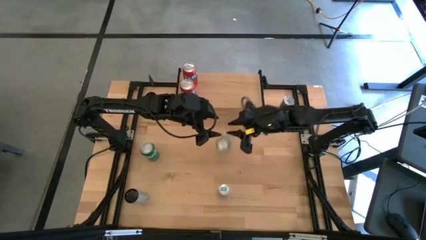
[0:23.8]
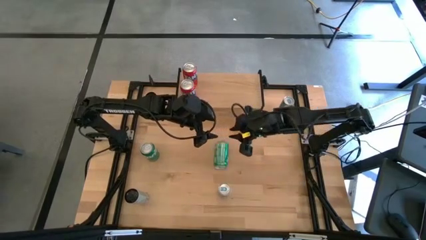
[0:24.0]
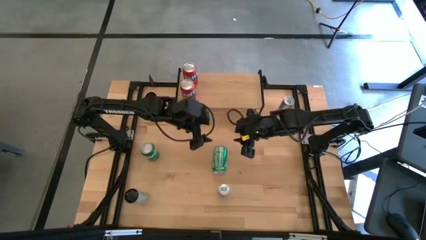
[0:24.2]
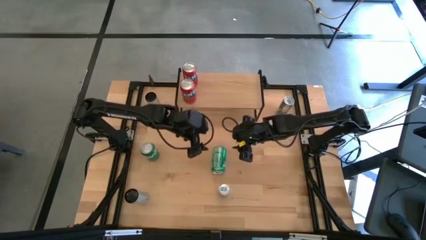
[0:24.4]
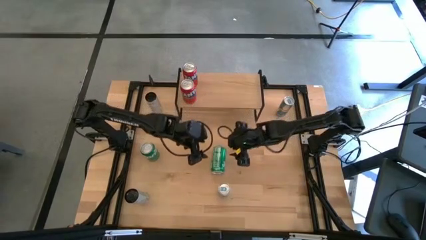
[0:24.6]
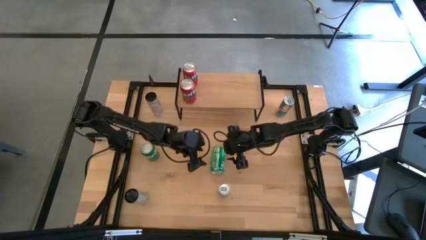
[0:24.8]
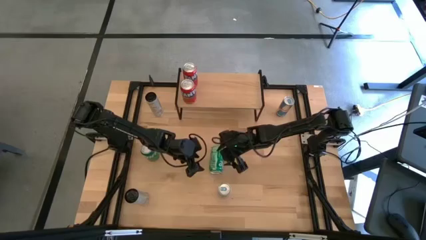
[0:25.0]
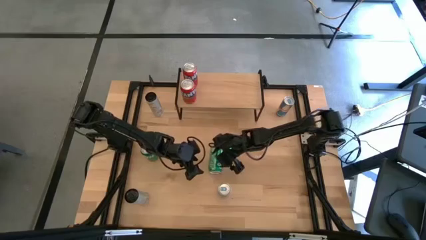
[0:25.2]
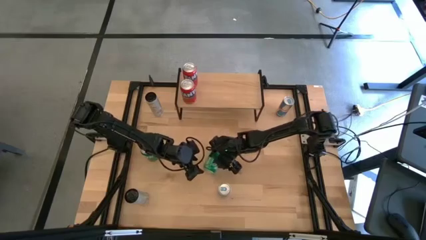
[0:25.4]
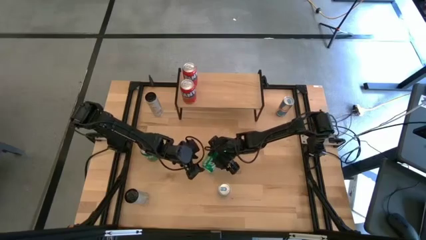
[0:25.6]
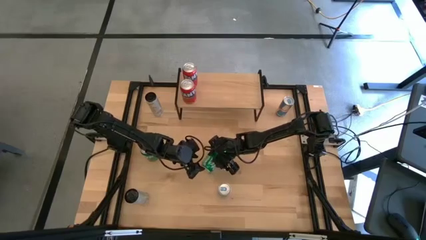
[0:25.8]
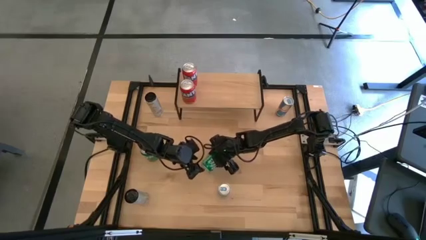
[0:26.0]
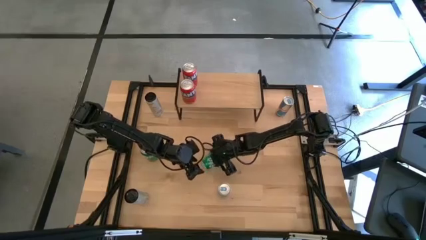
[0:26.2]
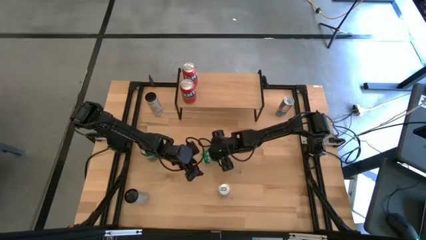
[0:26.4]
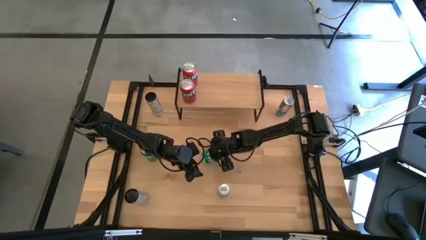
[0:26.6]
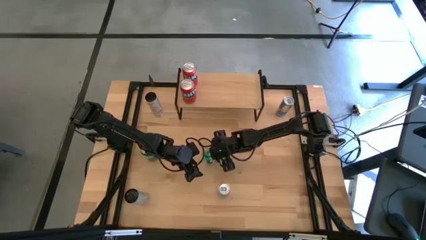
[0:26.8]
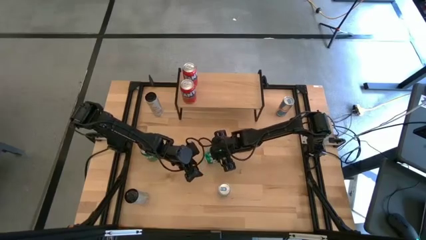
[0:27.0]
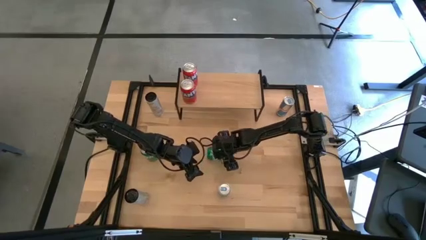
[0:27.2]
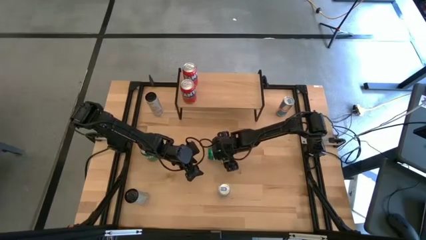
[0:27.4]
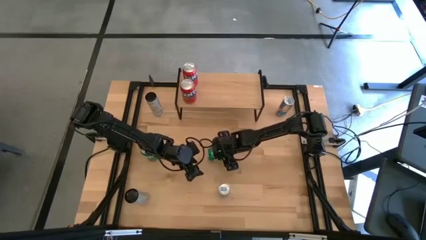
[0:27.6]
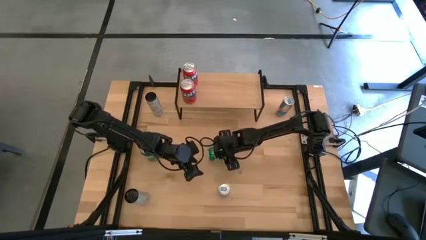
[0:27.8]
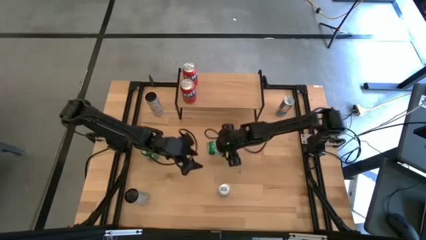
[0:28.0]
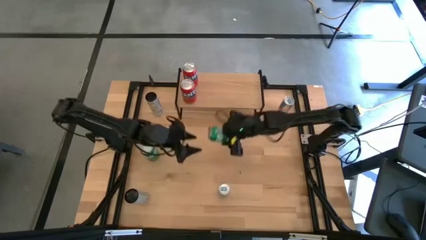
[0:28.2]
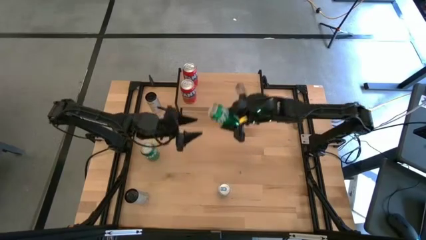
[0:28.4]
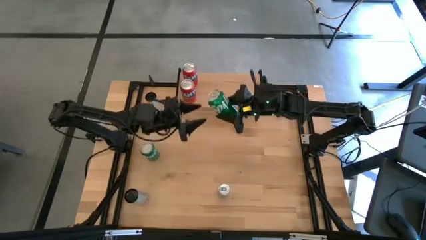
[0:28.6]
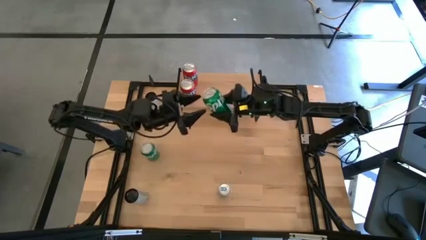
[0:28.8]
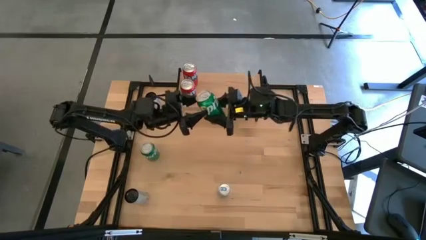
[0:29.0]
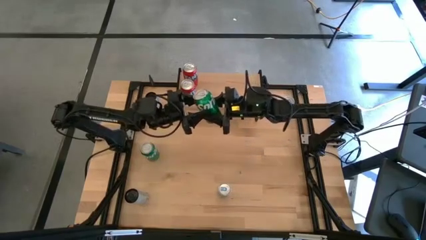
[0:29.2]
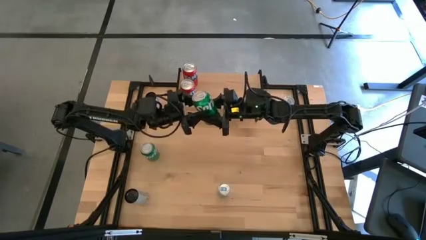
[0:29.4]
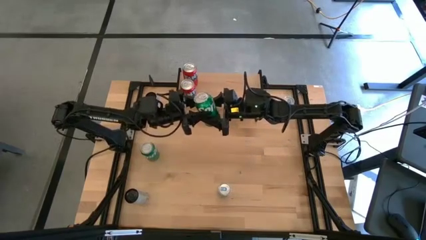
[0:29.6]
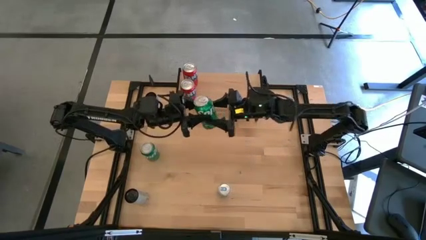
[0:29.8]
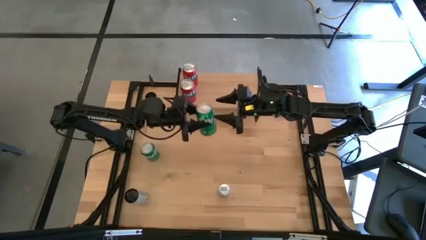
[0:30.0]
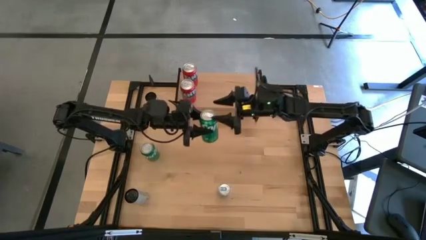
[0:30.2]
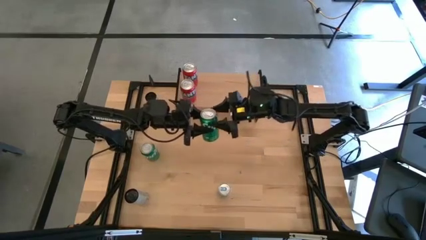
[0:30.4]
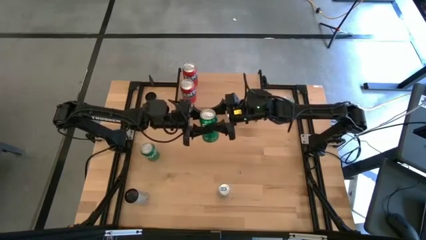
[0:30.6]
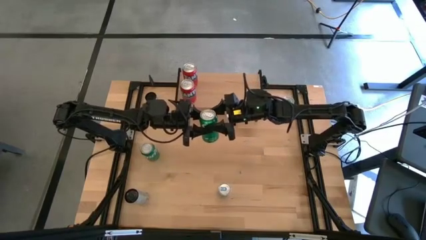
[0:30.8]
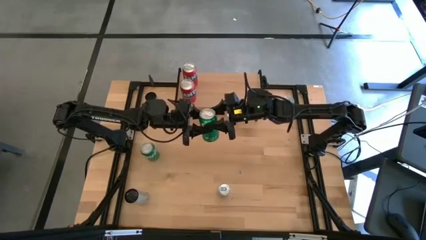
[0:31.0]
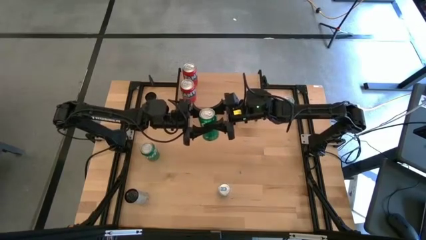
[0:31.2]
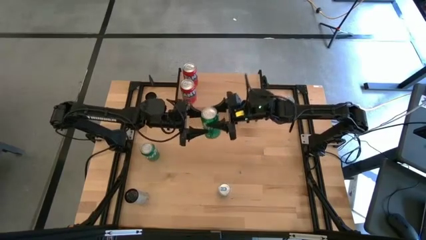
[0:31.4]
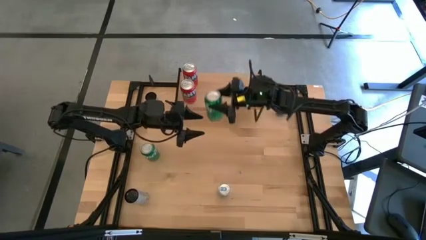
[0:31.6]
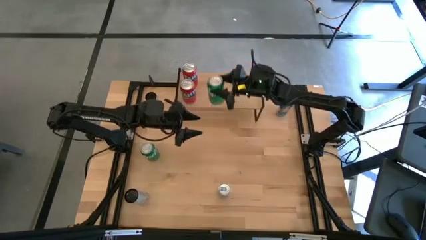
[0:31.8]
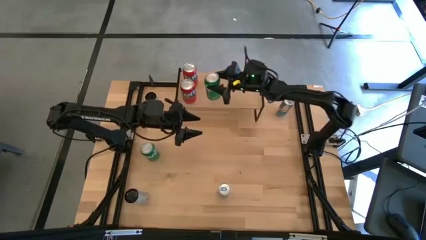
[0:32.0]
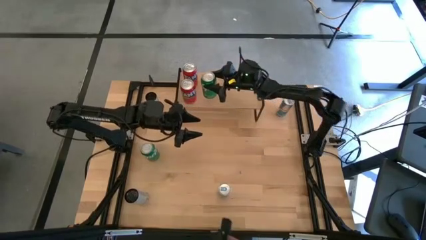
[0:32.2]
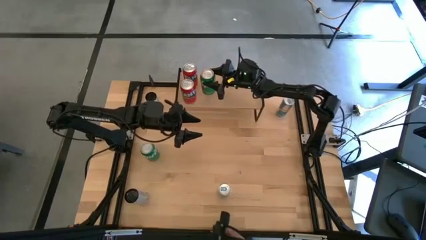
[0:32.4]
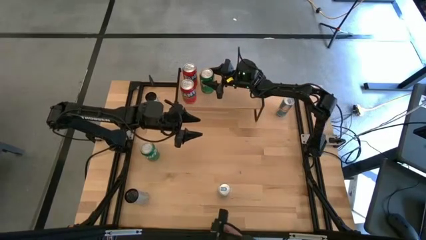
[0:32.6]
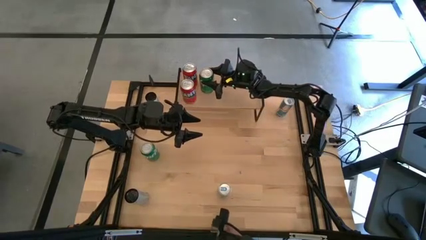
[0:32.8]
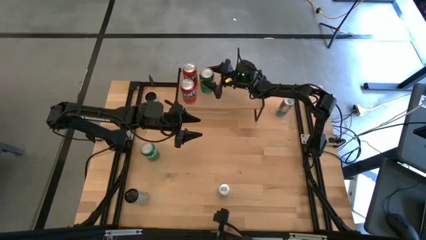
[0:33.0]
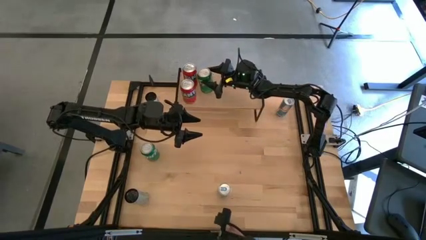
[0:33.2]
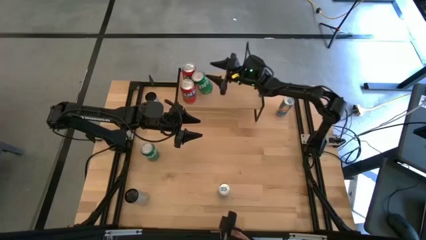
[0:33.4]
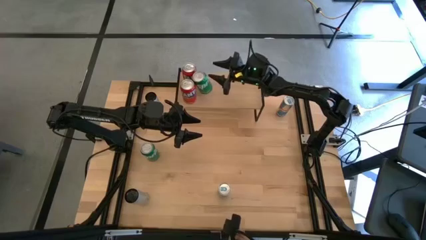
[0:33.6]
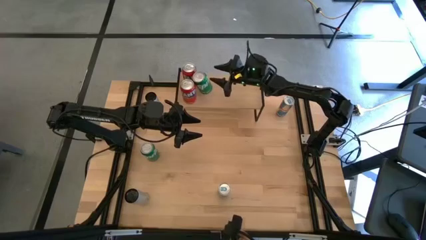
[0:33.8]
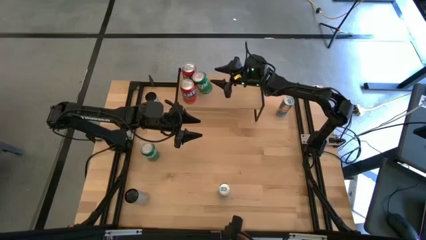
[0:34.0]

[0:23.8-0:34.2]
Task: Place canned beverage on shelf
Put the right green soda can on the shelf

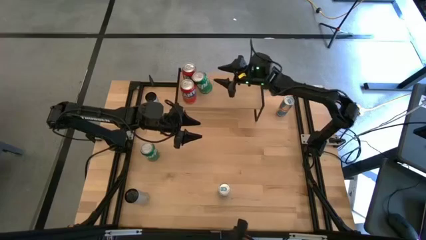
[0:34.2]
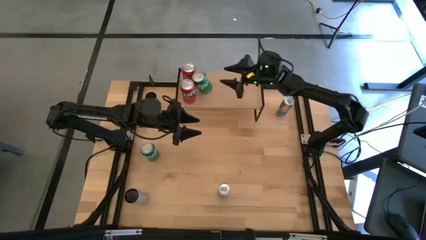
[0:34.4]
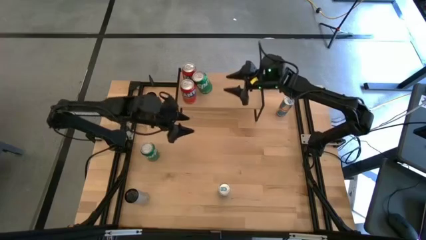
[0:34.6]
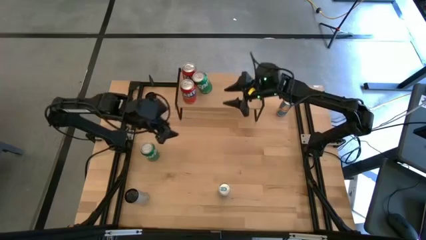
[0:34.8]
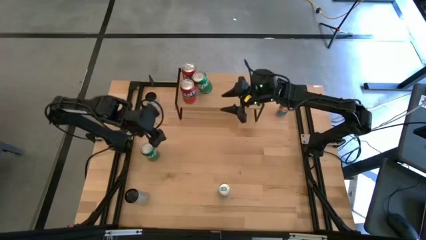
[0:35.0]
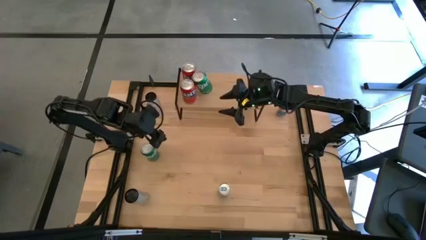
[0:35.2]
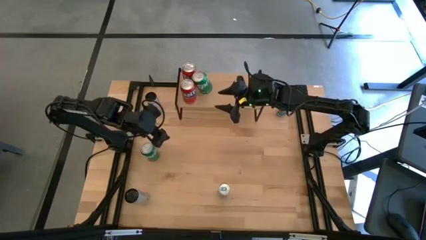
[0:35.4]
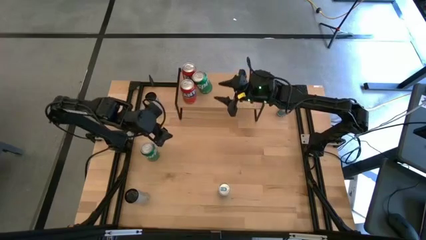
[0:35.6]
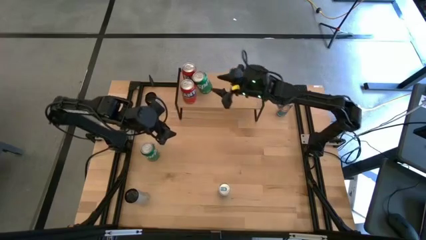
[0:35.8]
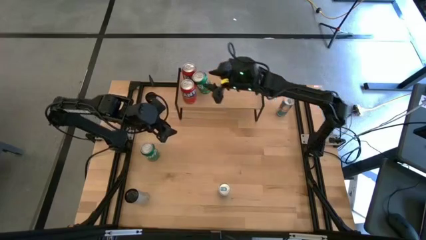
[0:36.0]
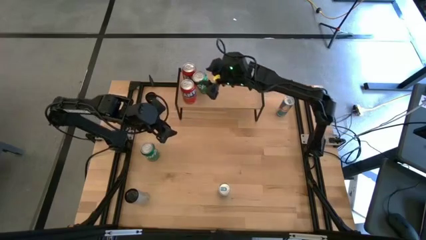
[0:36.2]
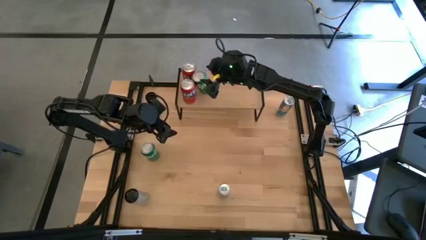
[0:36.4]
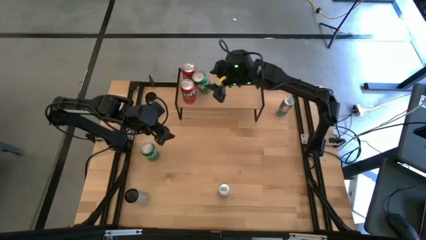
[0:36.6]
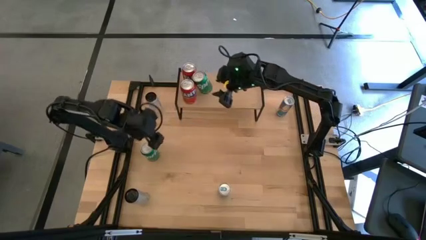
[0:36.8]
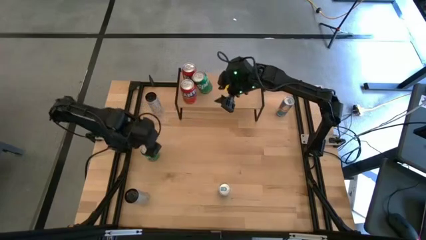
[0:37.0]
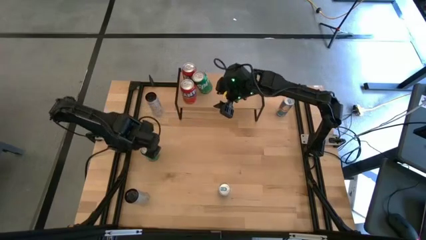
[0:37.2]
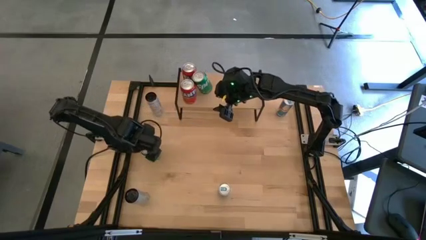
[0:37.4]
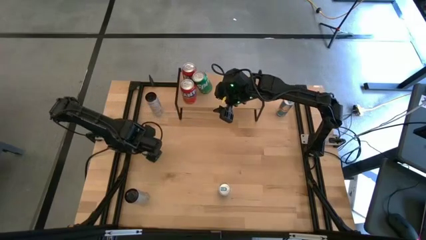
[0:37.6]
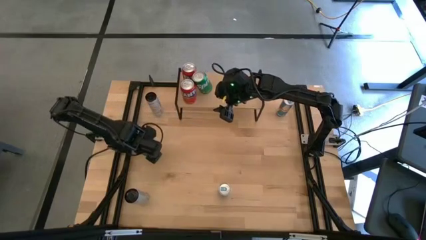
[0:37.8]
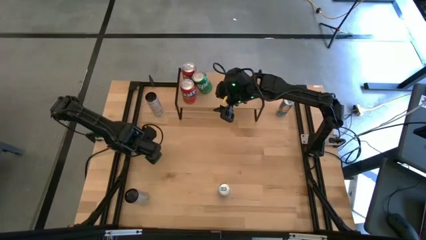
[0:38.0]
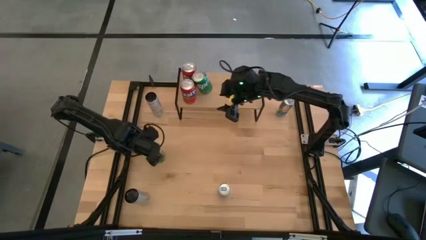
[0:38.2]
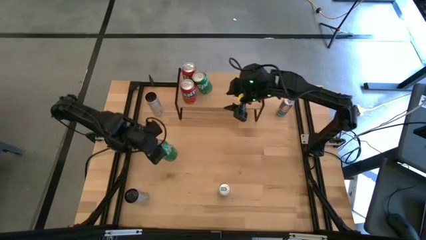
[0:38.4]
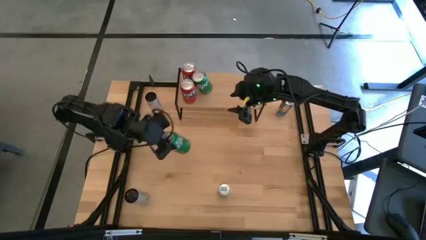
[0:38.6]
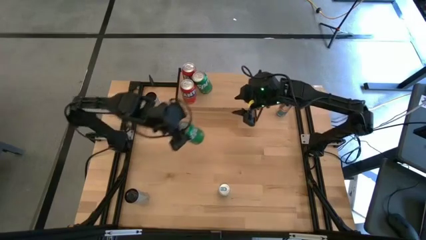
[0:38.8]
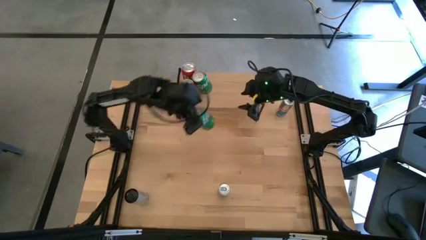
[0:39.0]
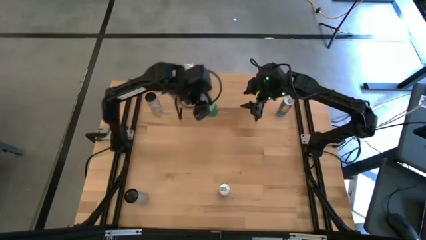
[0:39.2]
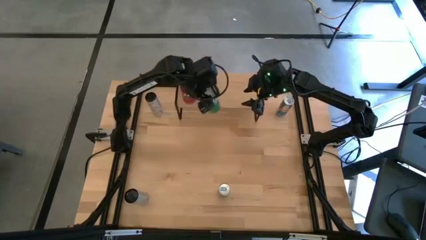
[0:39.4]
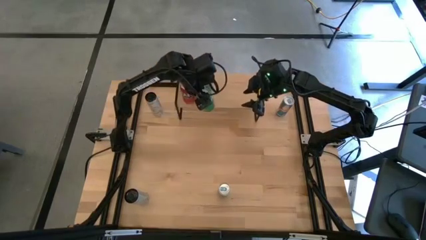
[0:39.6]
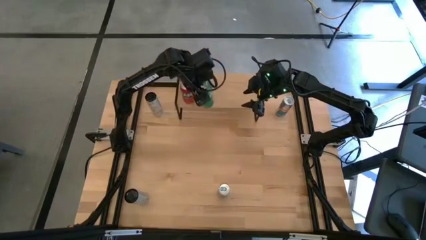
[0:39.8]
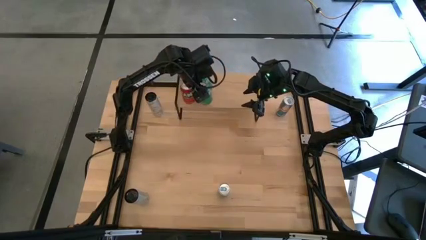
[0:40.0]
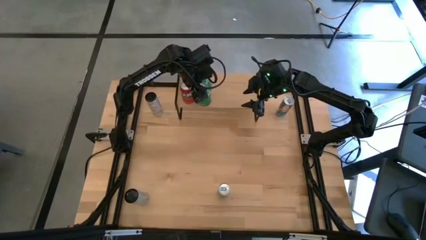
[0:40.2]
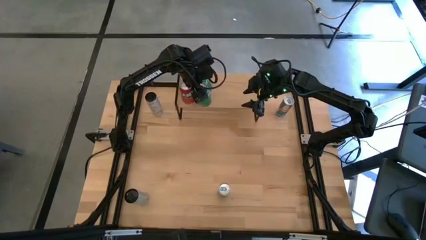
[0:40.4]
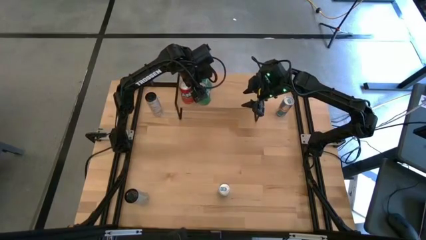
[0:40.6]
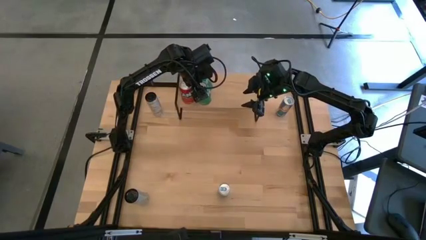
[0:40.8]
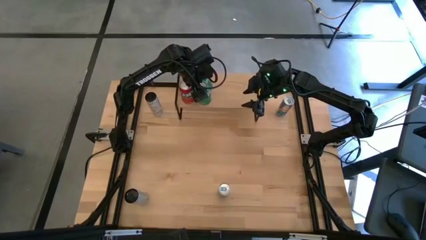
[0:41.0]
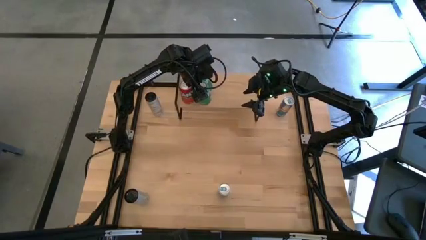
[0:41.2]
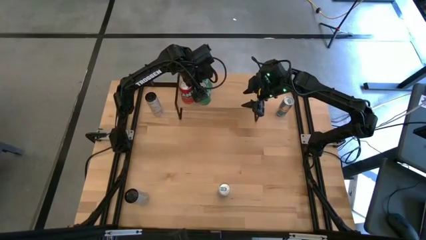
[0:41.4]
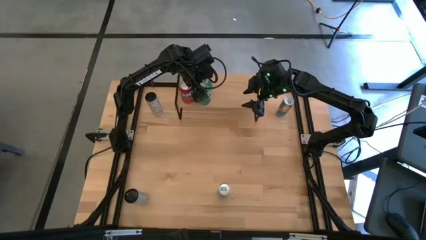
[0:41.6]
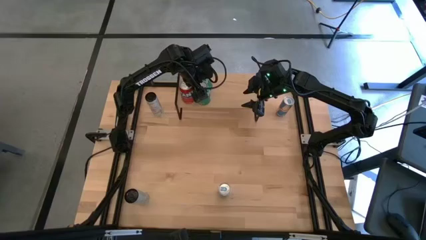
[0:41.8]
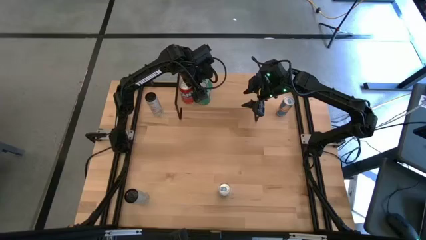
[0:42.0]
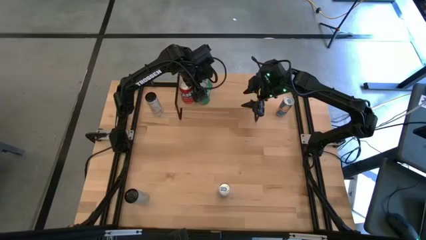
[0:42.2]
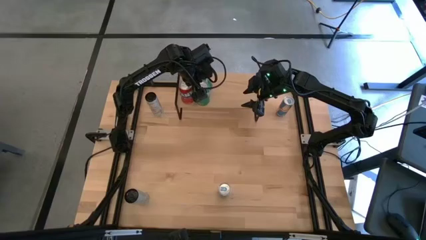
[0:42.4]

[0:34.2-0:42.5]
Put the green soda can on the shelf aligned with the other green soda can
